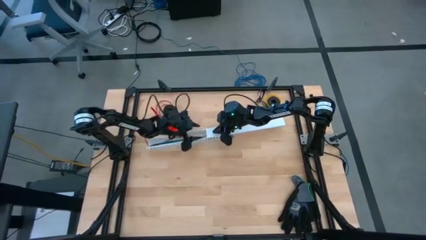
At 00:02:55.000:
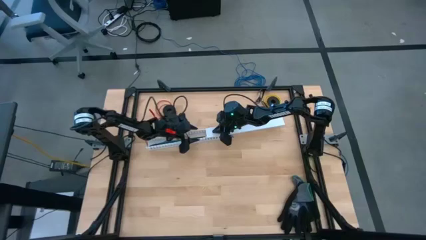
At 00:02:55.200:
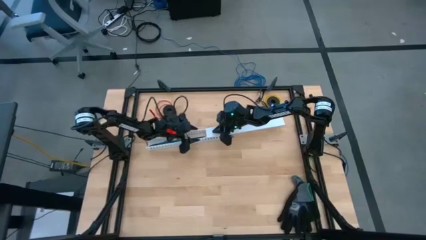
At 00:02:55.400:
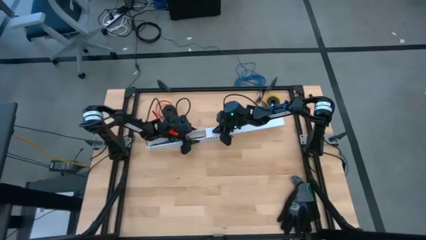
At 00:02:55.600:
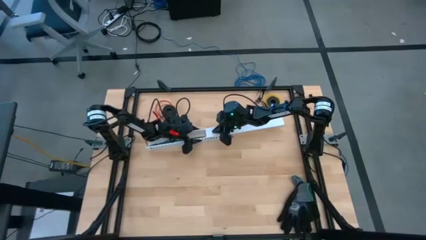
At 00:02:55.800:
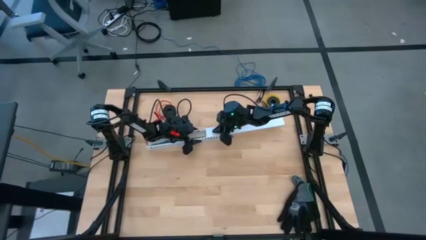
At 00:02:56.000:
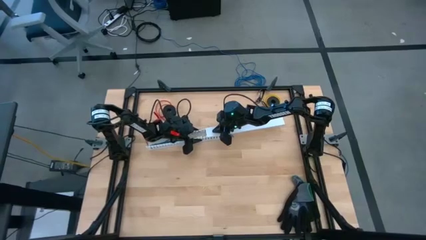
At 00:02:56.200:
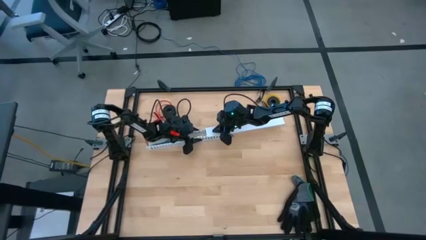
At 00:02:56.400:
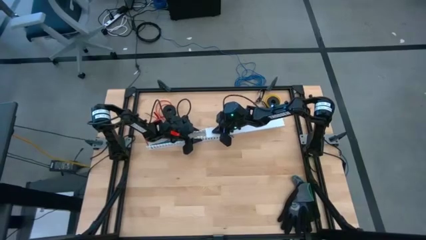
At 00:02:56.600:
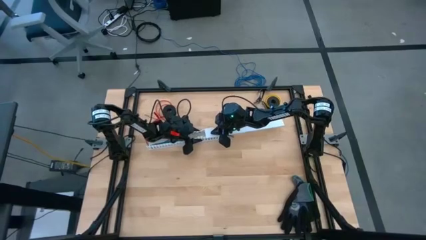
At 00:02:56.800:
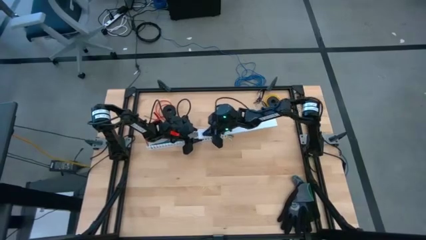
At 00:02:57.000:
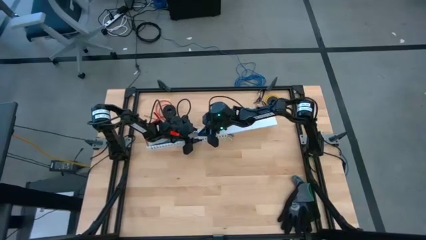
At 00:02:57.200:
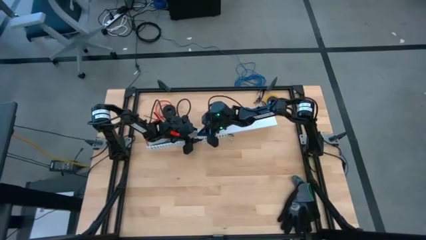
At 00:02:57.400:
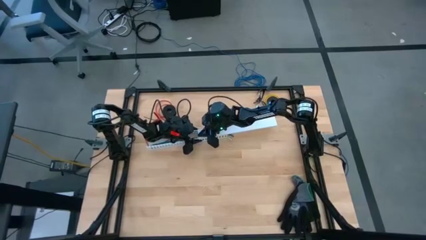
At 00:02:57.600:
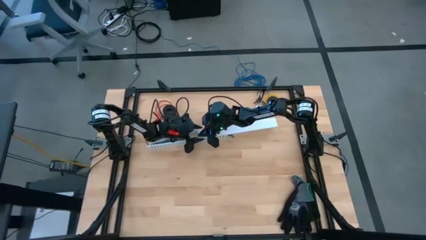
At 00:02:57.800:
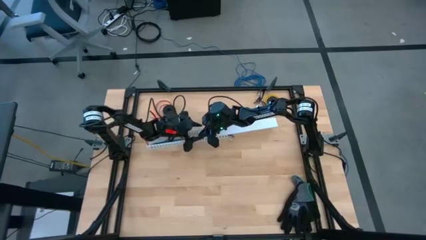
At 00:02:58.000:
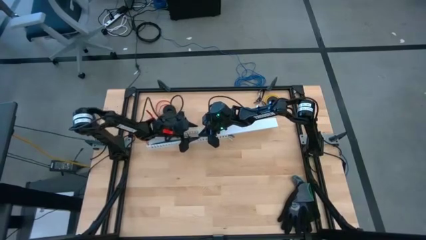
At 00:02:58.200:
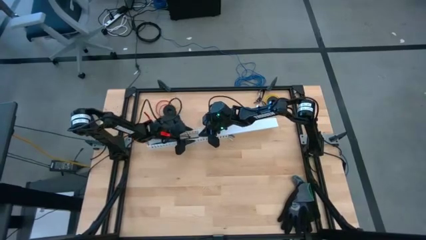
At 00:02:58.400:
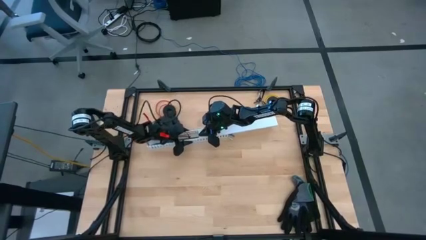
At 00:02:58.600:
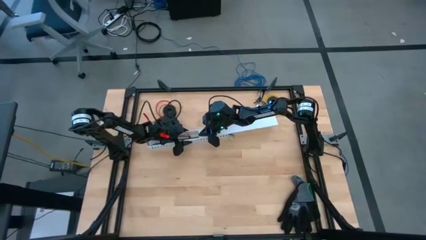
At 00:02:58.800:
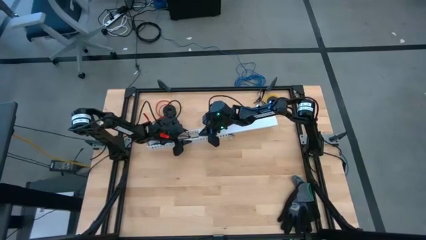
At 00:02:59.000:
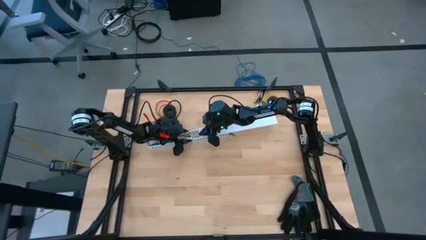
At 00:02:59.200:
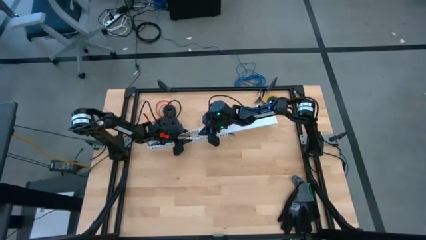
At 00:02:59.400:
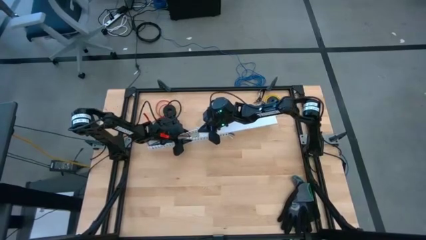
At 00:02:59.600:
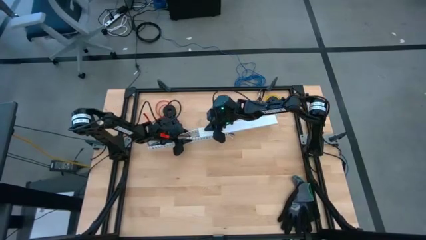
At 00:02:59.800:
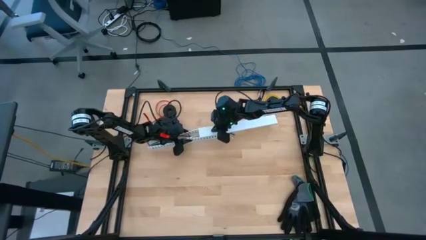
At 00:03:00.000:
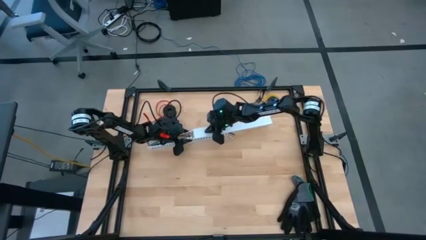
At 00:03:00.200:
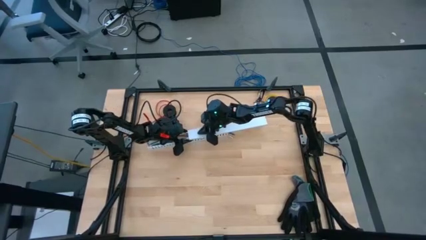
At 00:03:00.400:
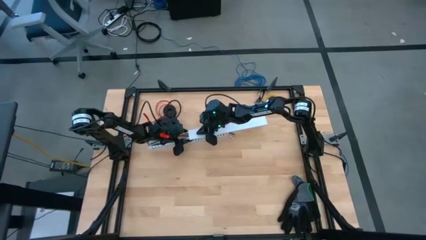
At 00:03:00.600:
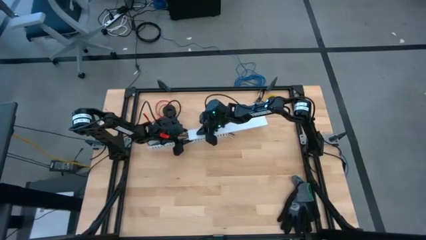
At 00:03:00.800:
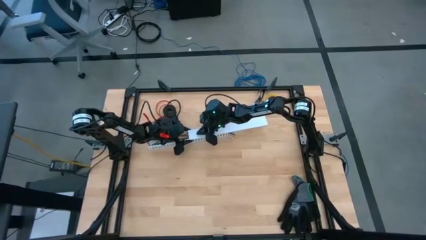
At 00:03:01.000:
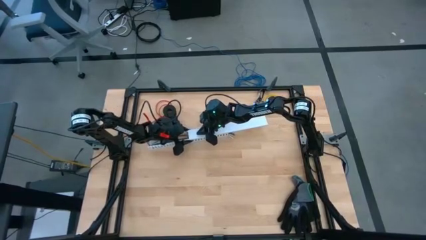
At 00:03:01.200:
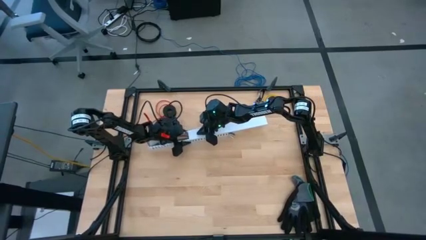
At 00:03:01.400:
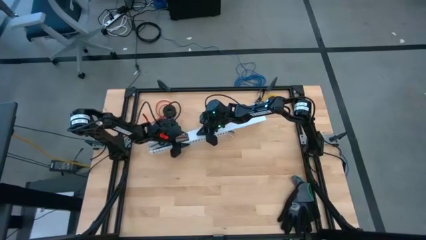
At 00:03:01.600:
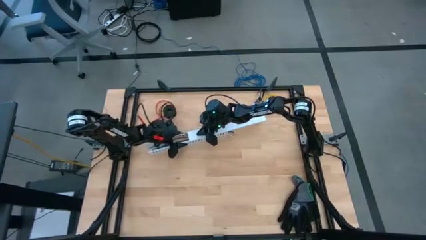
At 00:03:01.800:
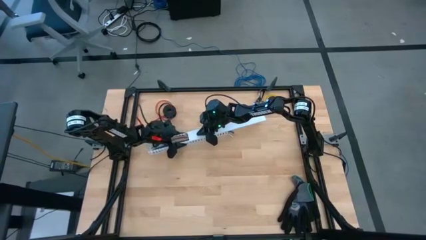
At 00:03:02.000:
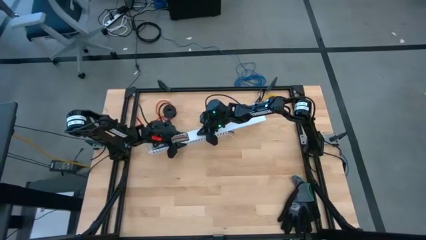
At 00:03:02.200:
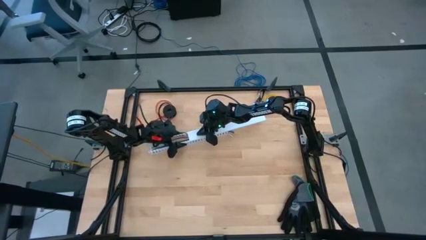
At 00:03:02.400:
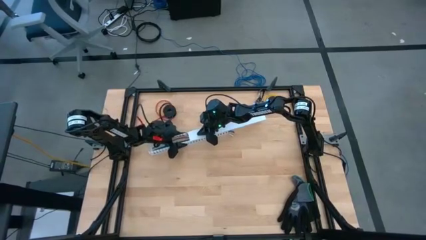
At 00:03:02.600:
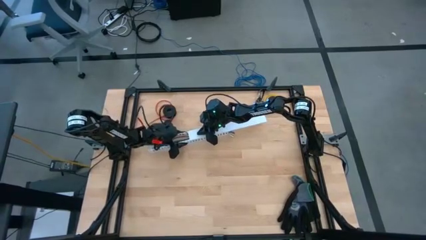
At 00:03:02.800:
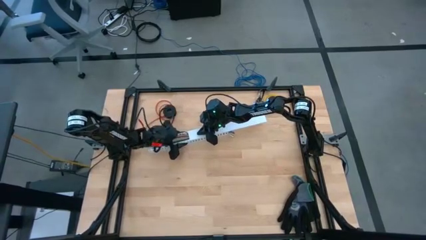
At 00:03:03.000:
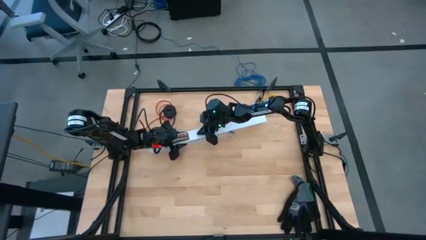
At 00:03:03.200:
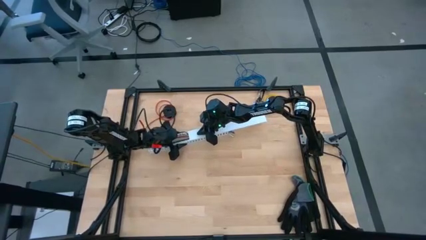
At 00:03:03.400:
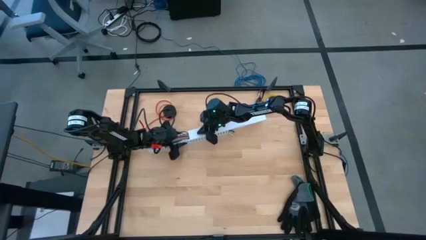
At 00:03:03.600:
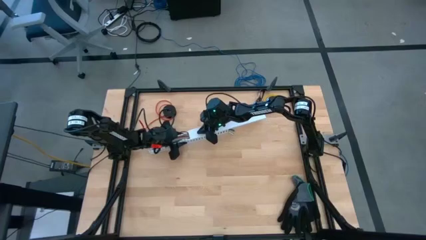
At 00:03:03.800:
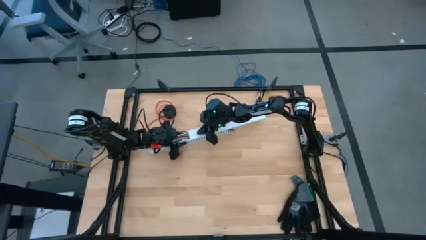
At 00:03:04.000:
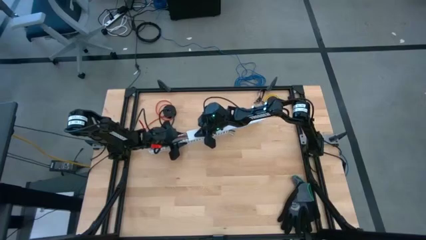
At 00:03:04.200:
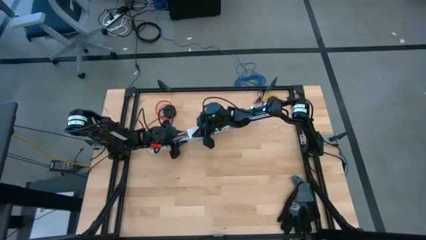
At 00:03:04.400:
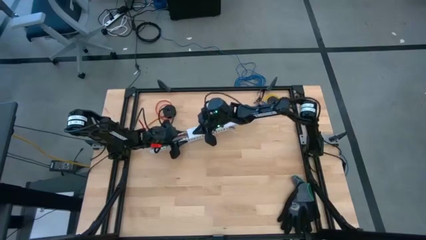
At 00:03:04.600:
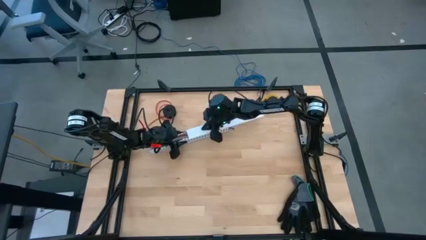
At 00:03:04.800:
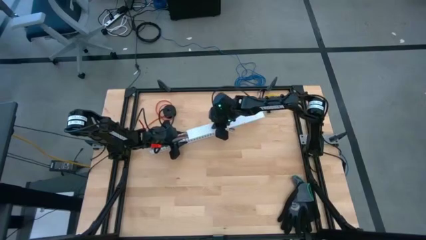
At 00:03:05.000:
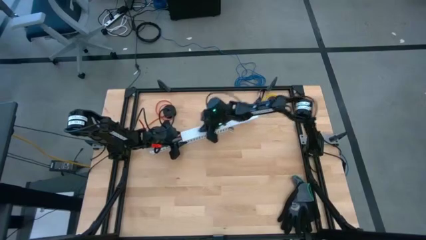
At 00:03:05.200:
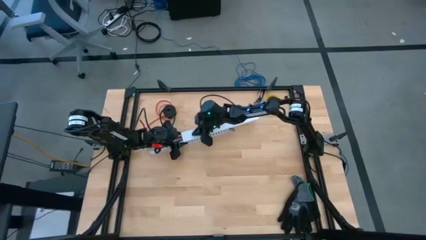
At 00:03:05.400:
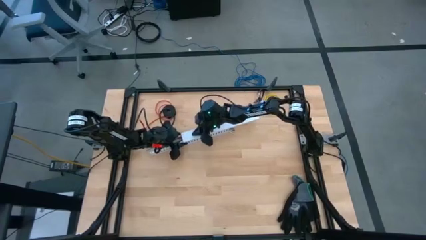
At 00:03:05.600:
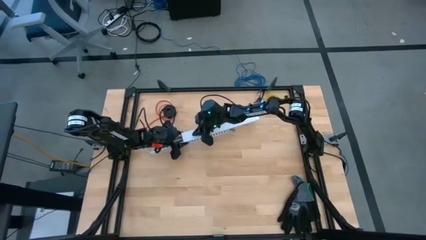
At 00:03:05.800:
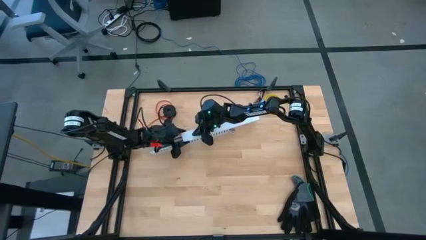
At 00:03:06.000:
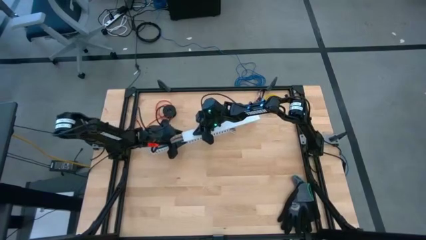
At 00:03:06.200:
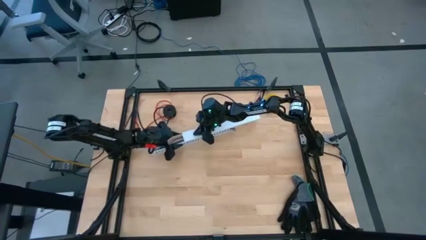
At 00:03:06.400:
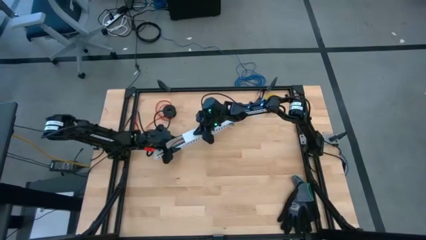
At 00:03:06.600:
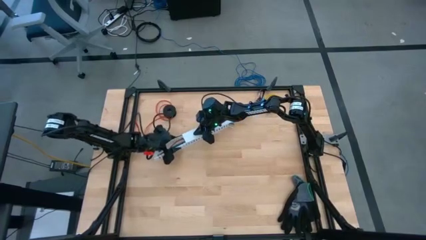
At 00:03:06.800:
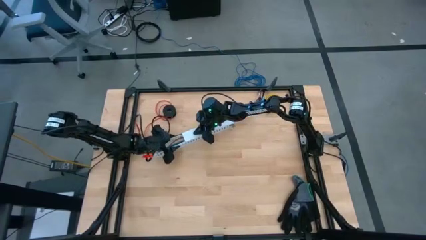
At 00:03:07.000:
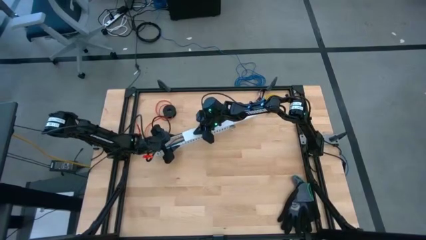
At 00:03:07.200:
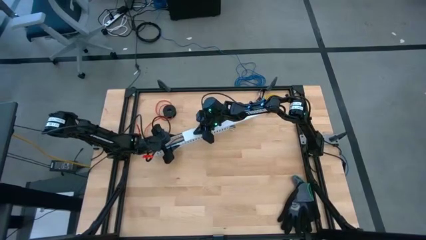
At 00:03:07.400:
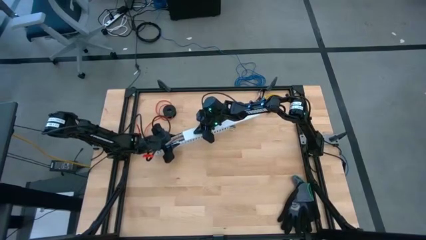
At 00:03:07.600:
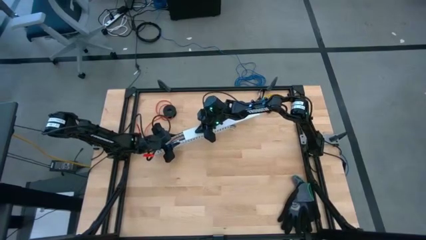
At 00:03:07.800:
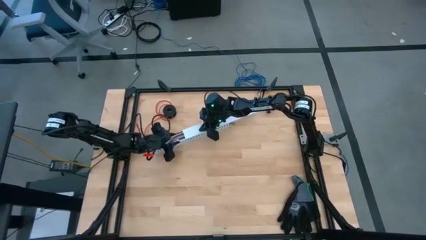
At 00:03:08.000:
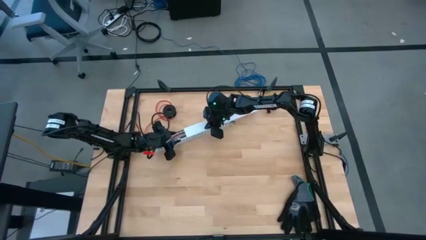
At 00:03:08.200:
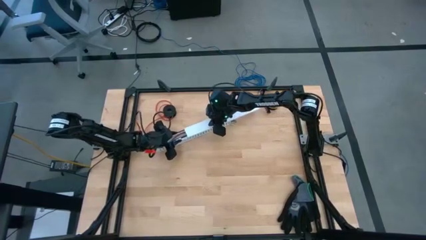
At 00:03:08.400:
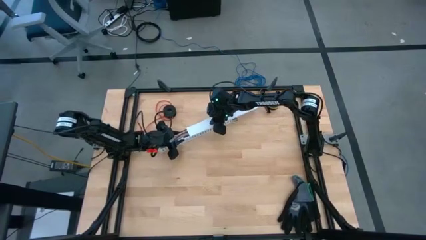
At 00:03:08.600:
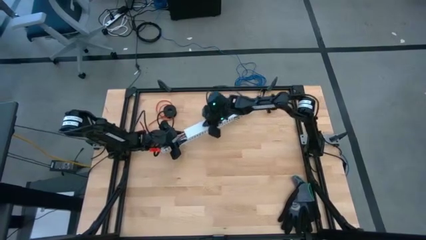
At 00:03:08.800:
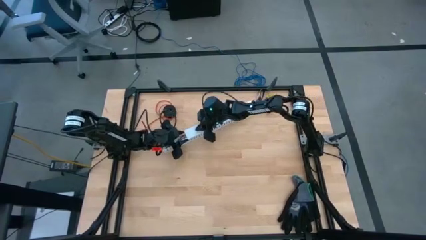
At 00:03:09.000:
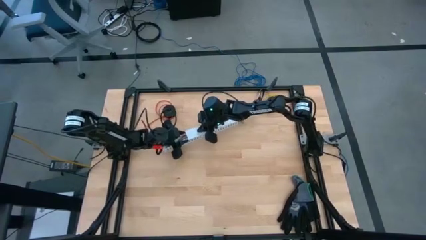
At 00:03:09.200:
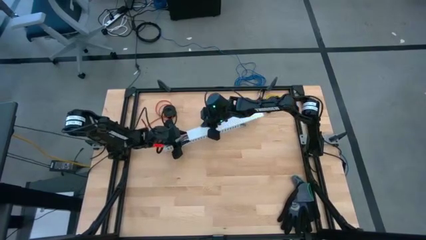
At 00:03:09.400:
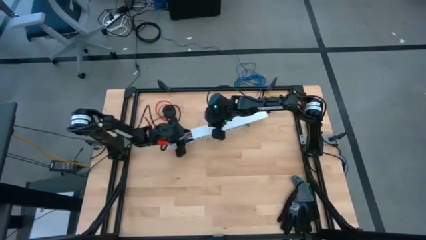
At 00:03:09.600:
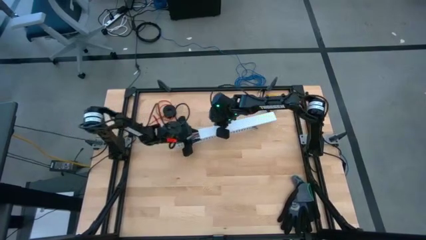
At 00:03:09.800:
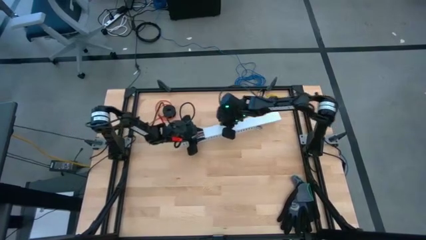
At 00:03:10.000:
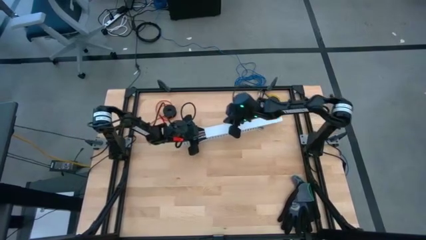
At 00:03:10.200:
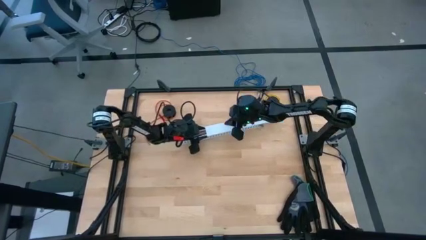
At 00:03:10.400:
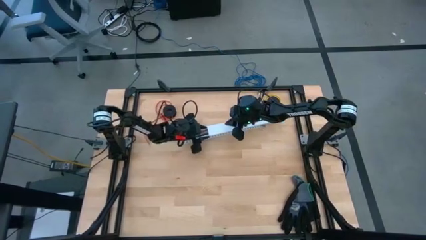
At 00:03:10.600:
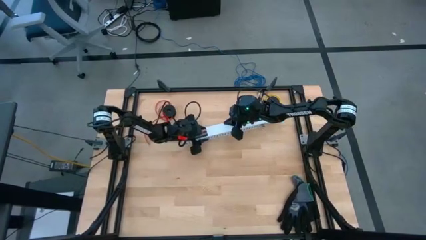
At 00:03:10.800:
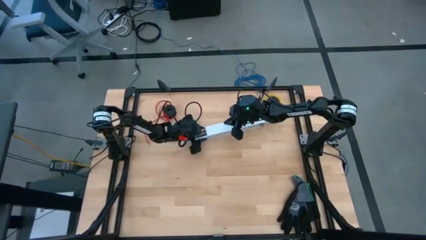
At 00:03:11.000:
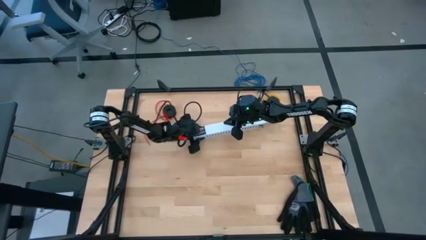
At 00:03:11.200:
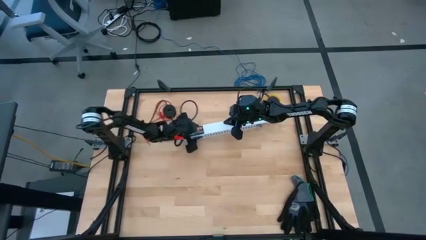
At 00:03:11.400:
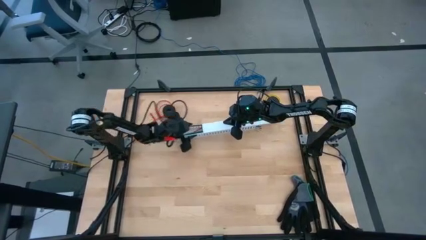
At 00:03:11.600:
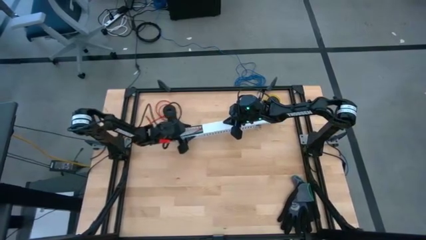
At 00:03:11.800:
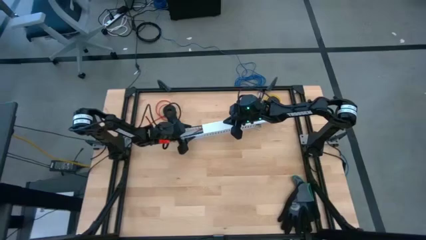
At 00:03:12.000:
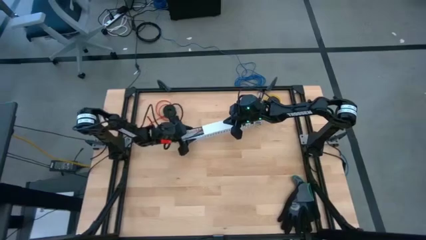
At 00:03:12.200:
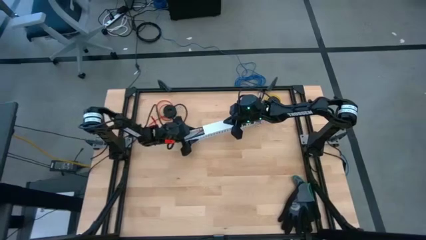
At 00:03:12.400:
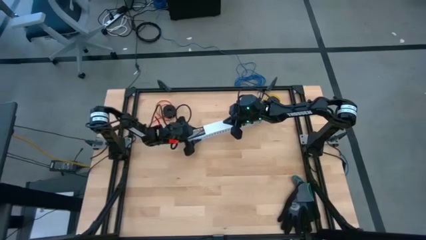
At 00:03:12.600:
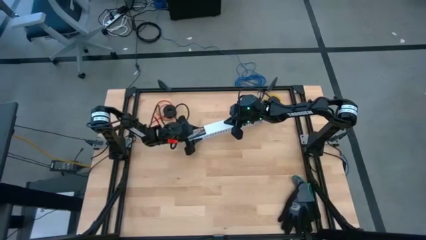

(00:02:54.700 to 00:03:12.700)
Task: Ziptie cables
Close the white cable duct
